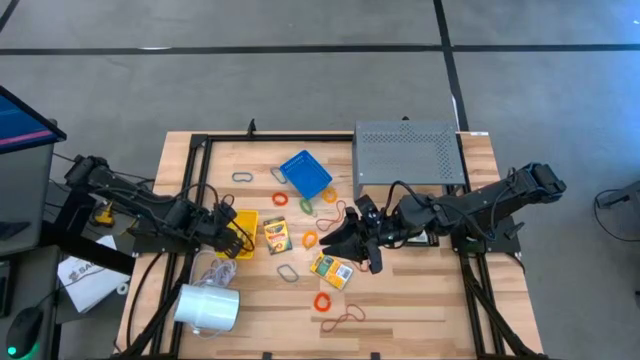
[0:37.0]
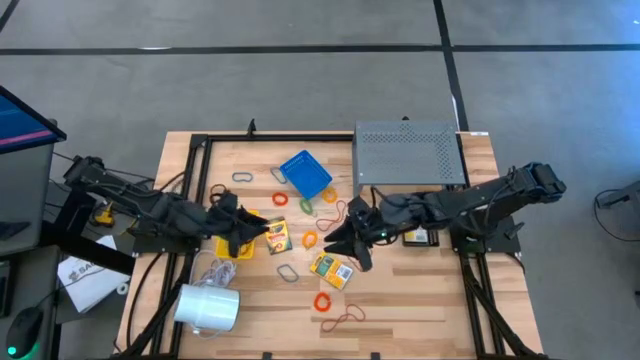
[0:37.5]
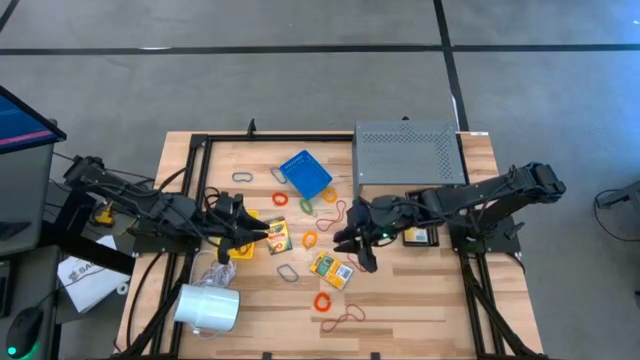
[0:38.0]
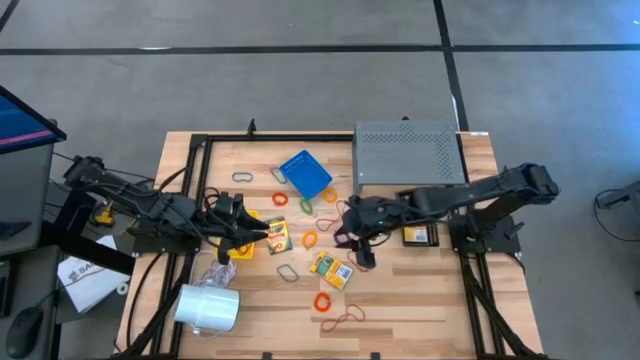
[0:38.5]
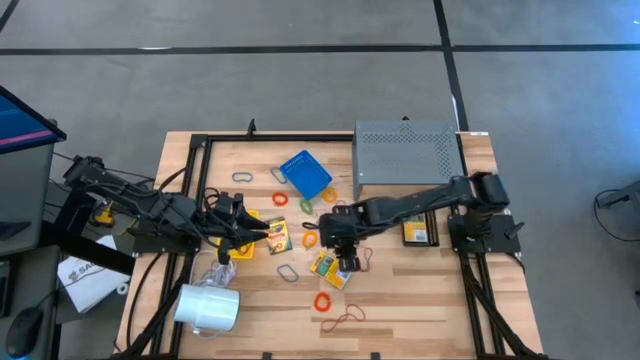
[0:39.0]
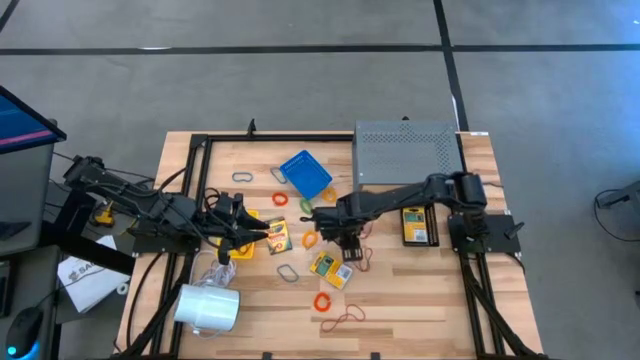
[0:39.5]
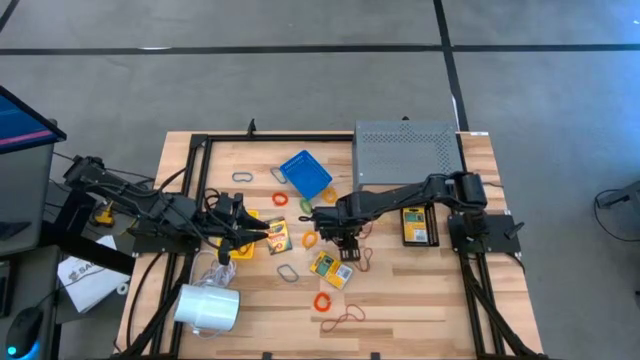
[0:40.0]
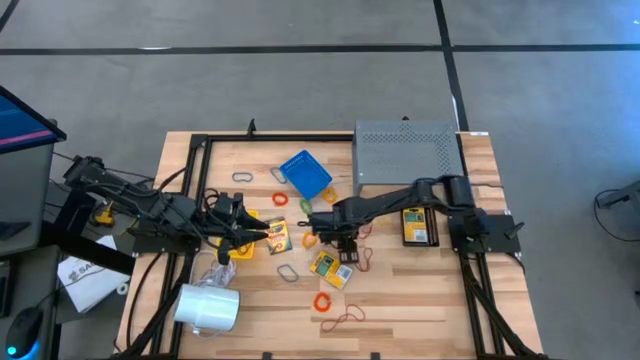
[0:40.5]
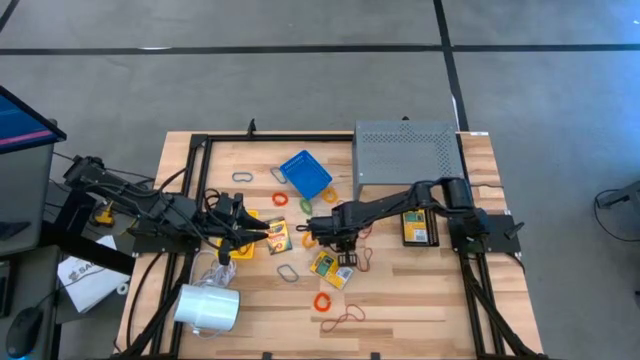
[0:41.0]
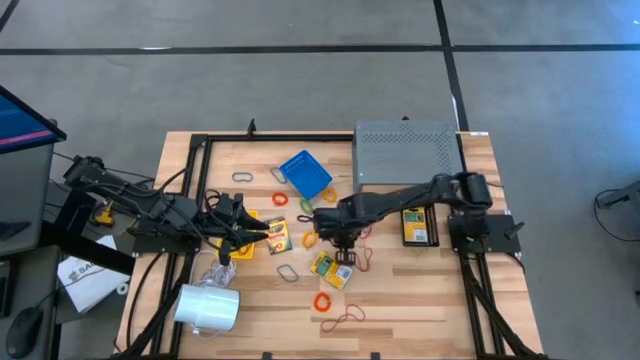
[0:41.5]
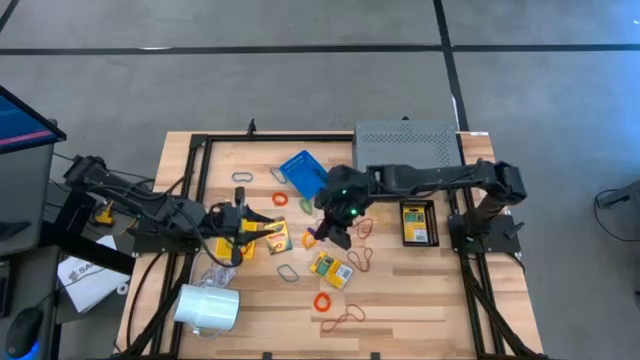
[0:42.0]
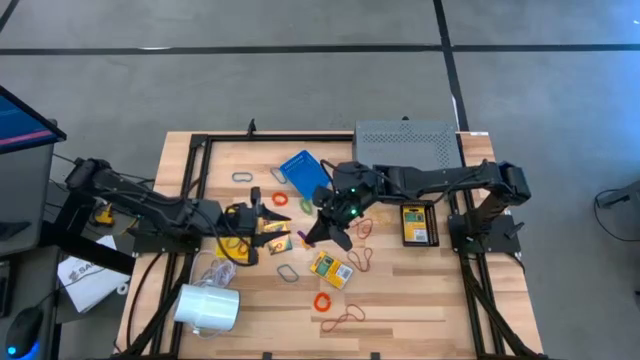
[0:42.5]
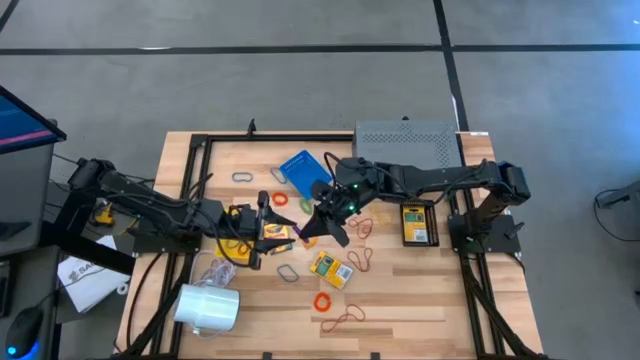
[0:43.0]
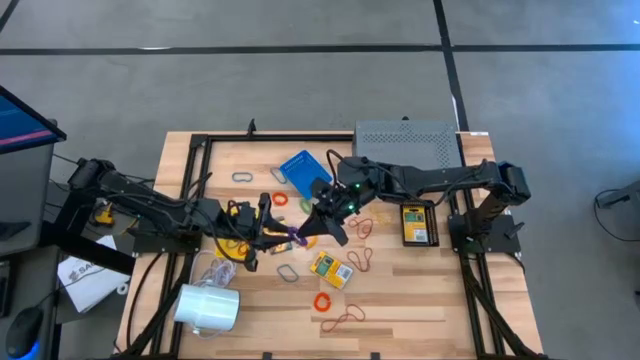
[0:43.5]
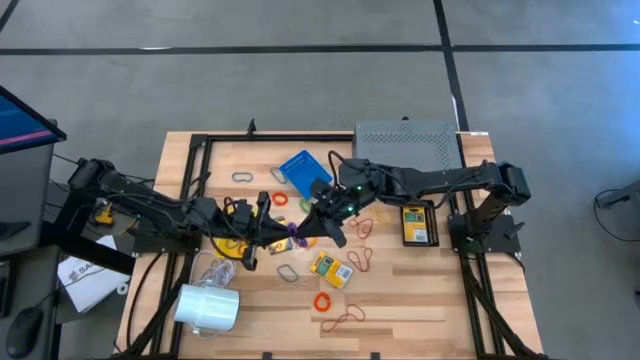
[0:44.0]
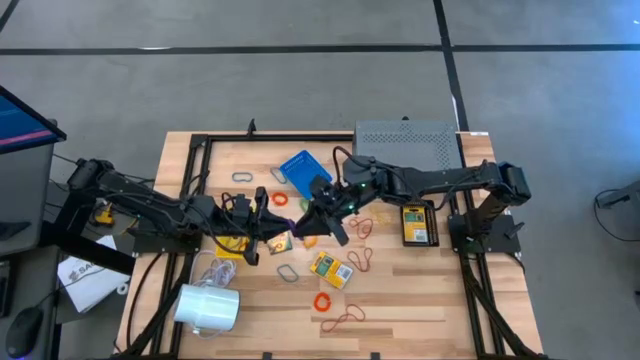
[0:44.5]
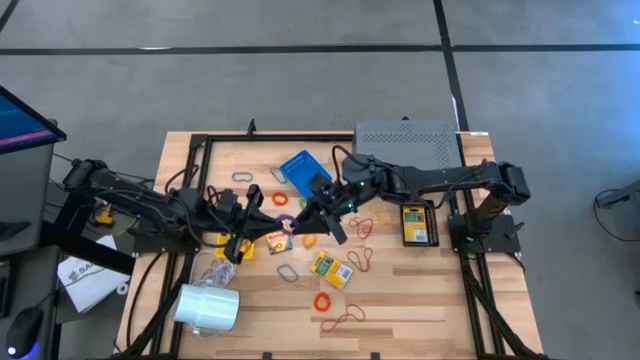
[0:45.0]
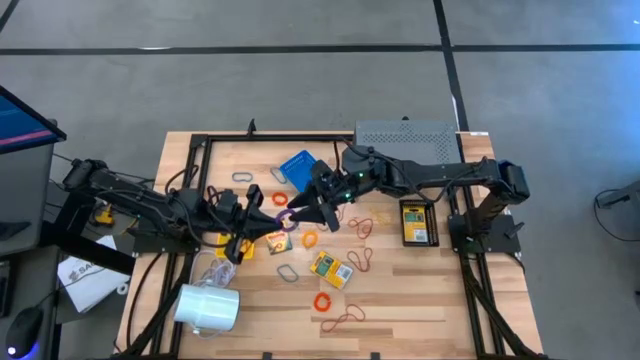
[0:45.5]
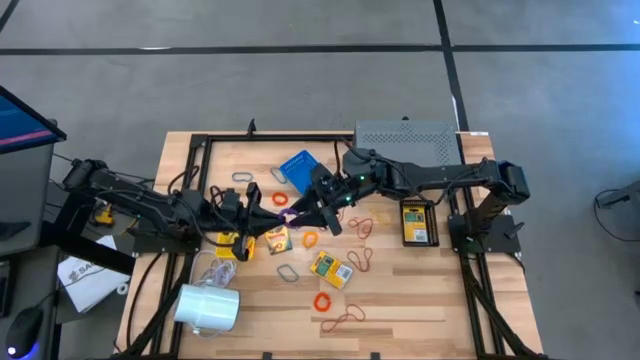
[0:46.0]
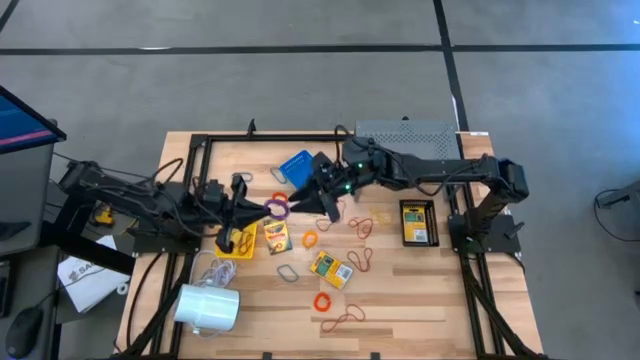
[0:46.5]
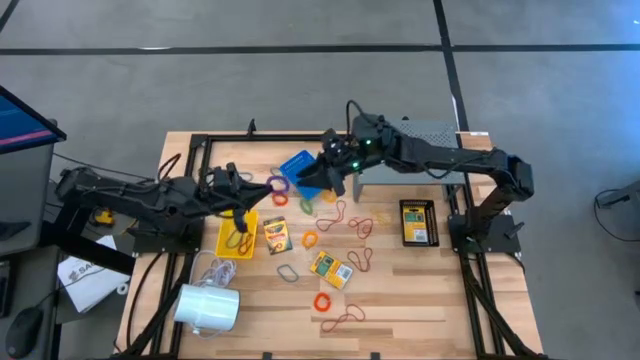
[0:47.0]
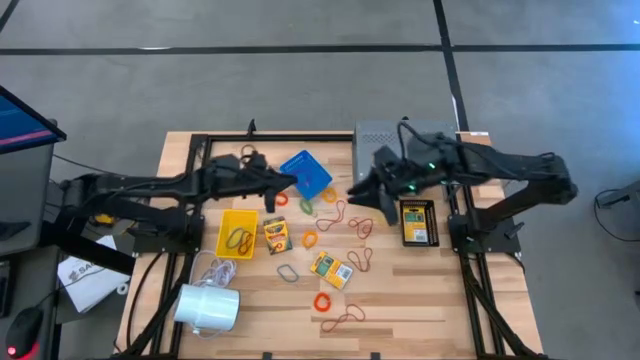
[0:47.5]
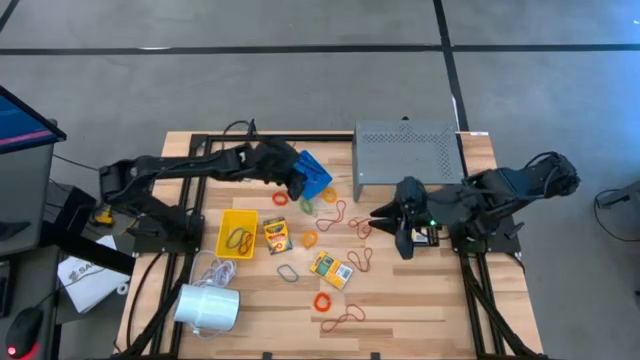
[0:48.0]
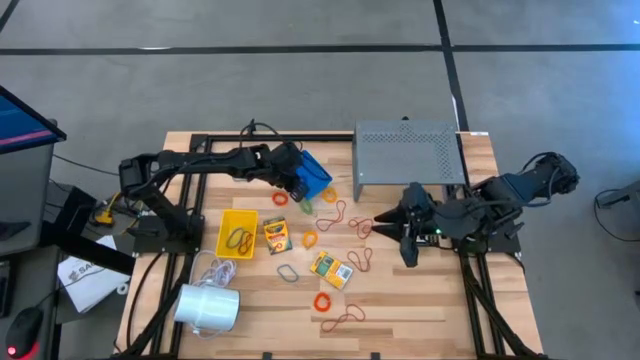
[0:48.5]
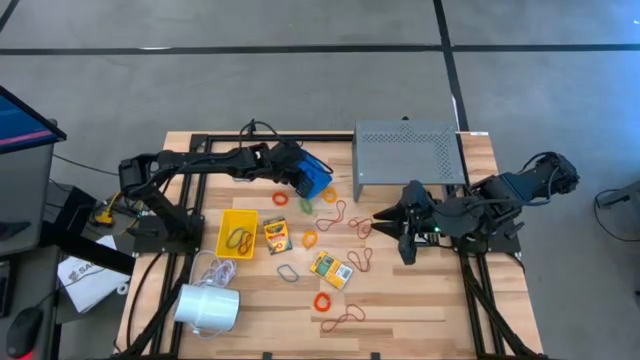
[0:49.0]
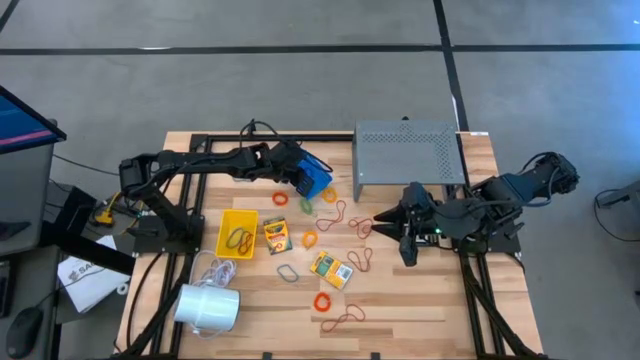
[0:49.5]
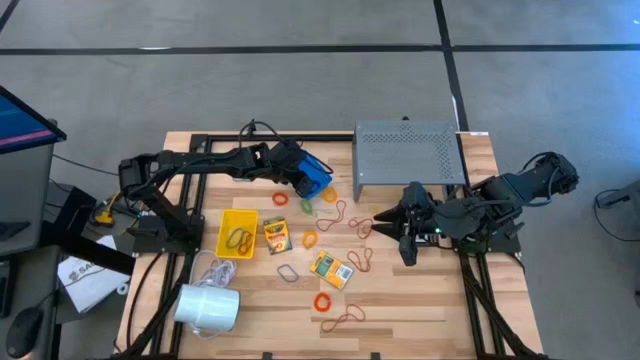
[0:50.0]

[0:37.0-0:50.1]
Task: Pick & Place Office Desk Supplies
Put the blue spring keychain into the blue bin

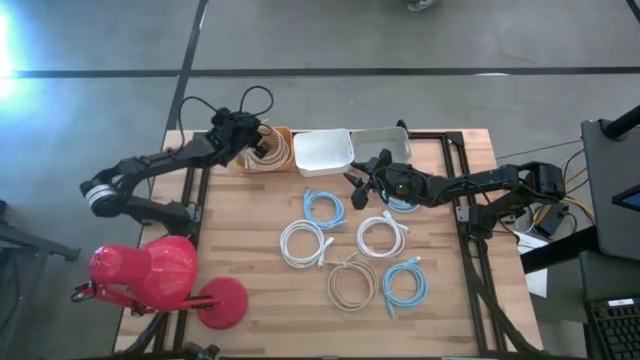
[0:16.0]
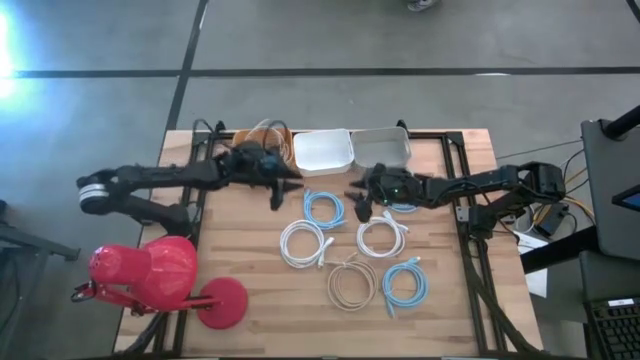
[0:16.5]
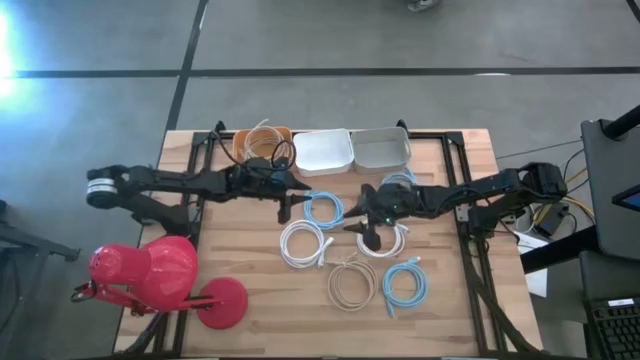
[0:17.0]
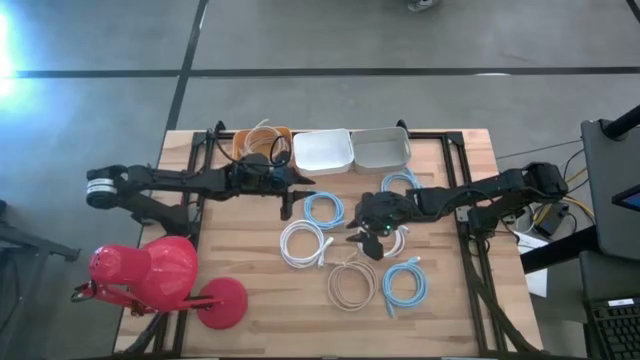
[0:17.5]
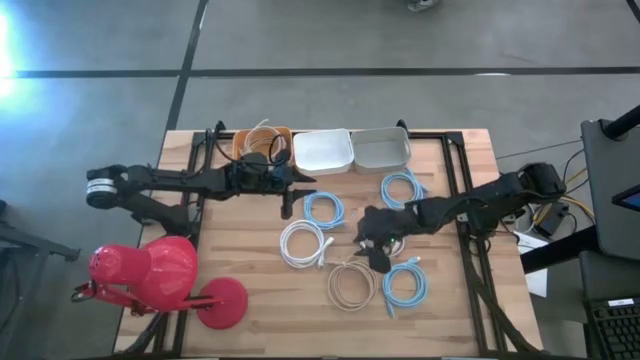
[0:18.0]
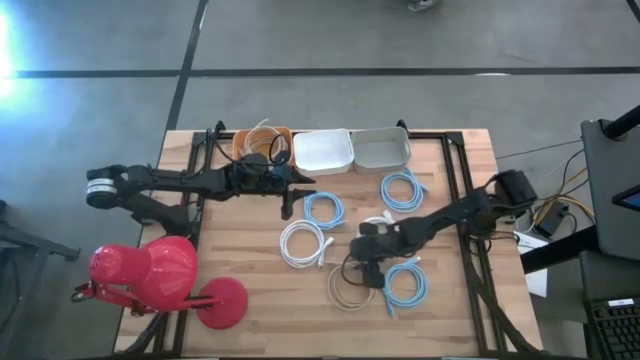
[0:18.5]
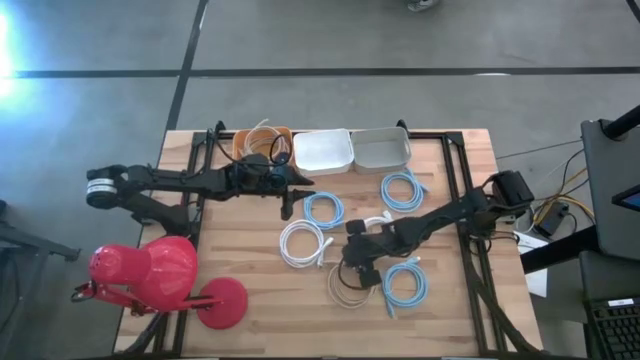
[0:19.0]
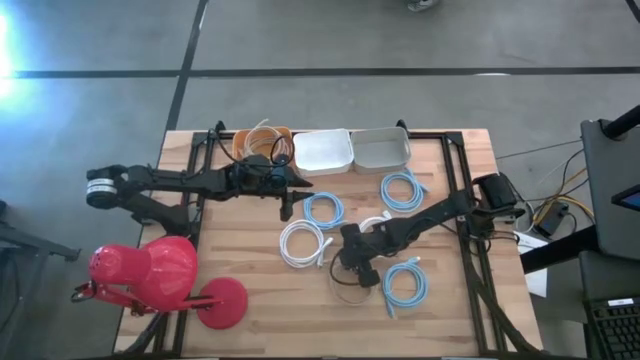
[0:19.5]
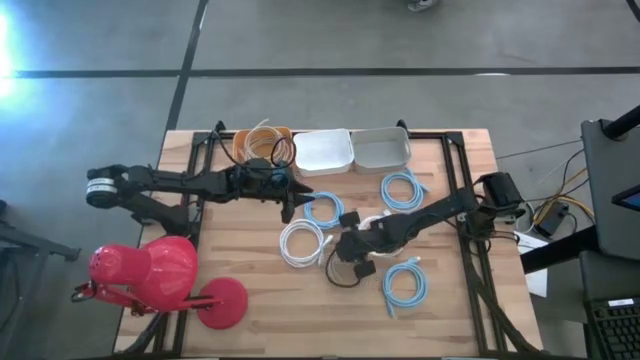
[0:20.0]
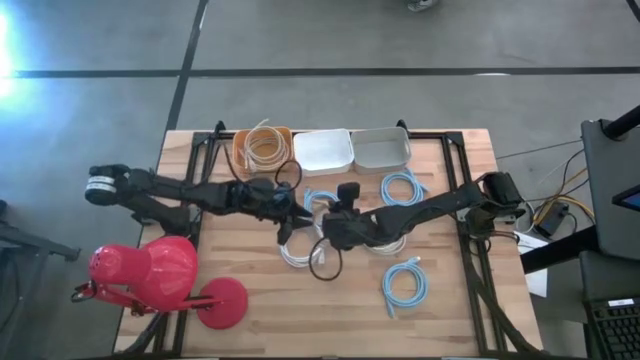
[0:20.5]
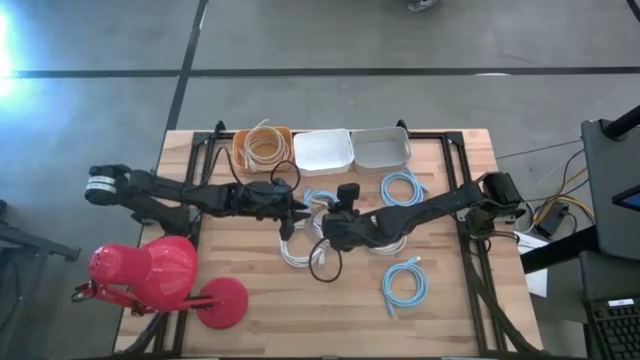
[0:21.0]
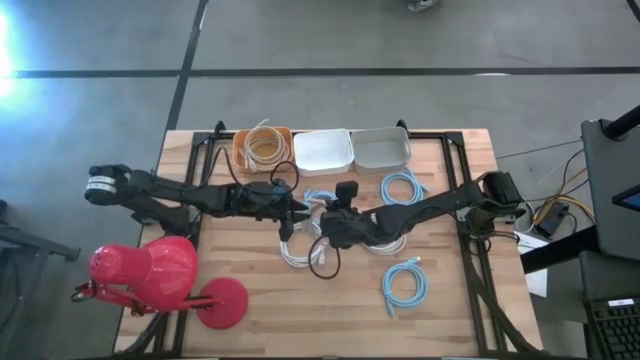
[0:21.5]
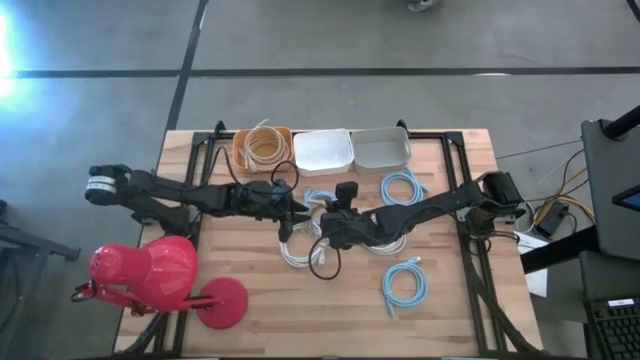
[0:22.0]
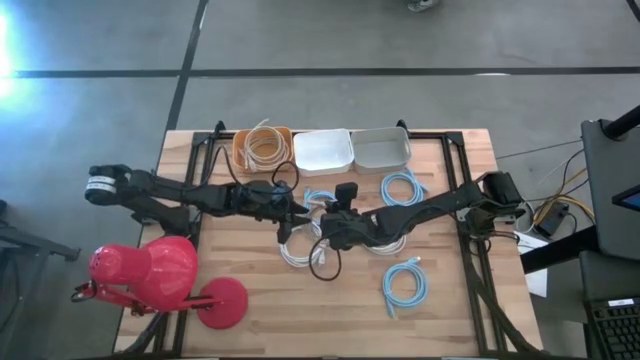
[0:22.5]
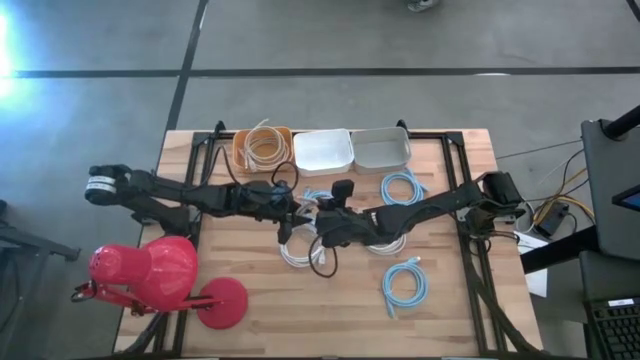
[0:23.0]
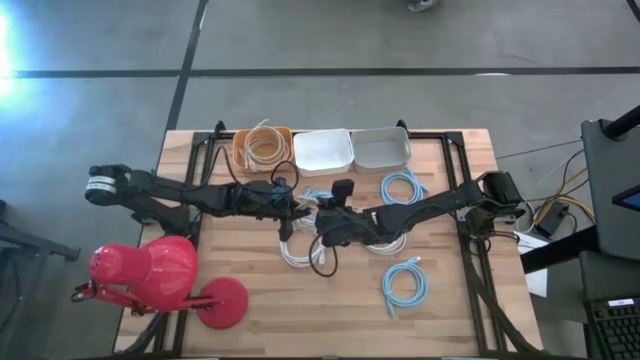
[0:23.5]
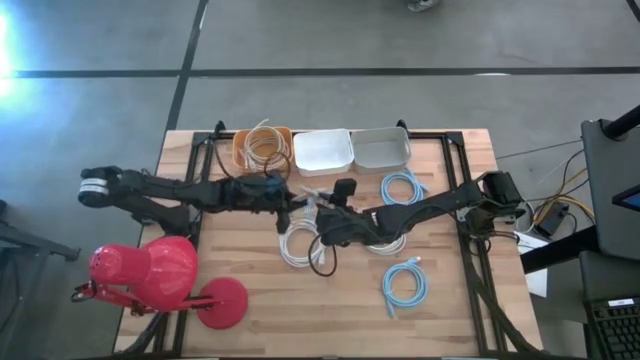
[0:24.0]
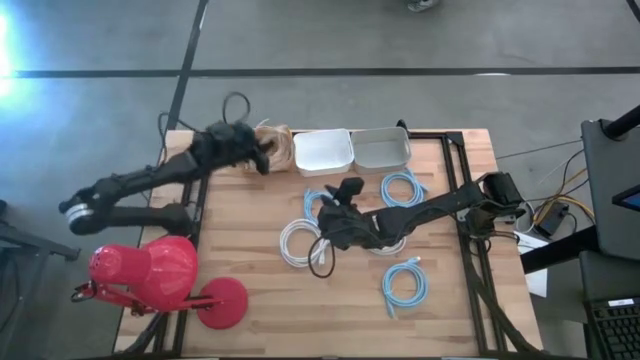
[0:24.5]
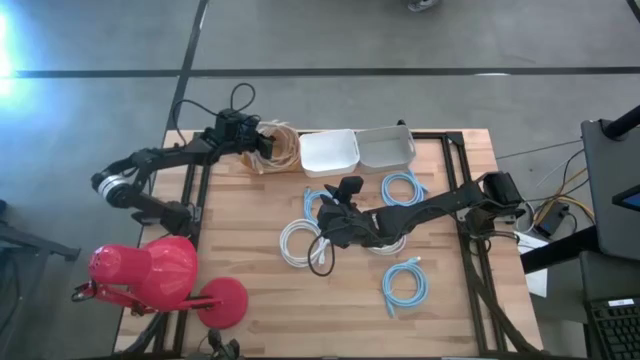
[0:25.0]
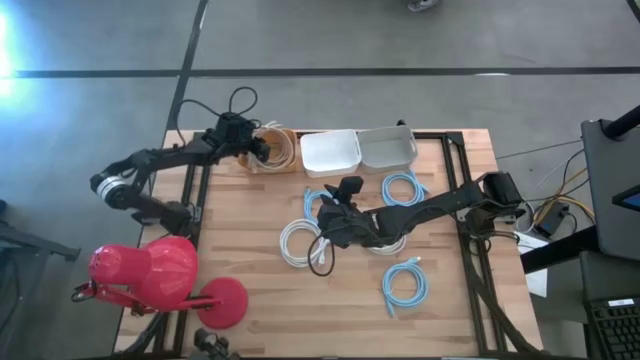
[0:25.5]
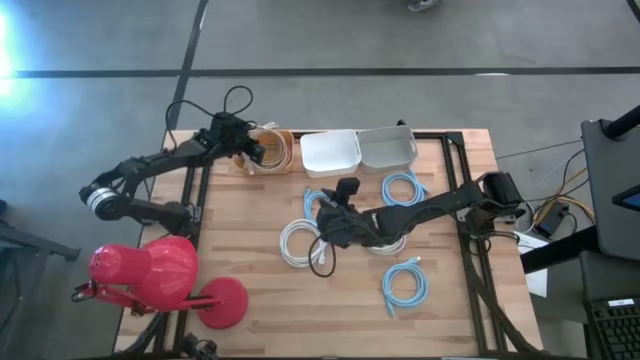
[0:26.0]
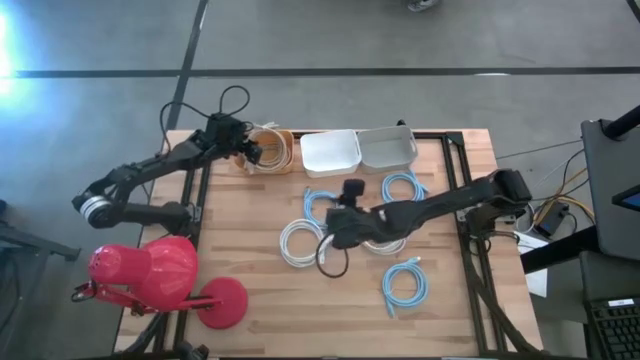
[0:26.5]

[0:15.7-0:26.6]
Task: Sort HDMI cables
Put the brown hdmi cable into the yellow bin
